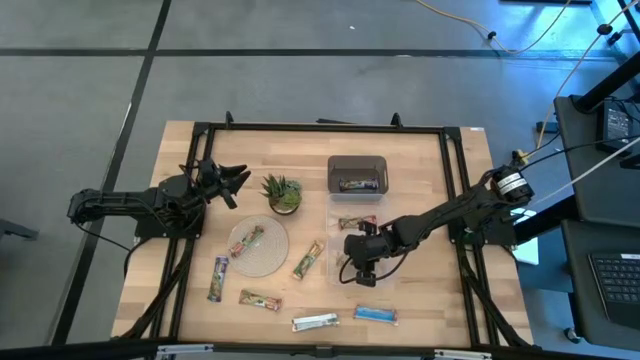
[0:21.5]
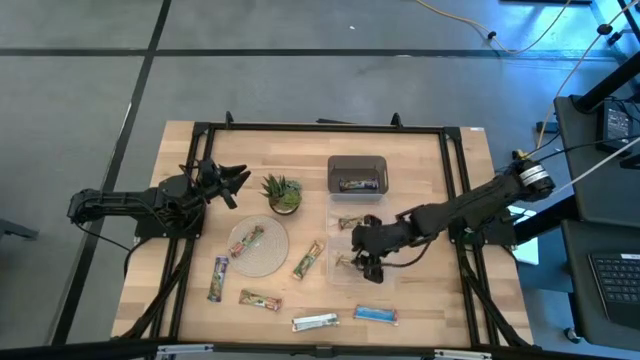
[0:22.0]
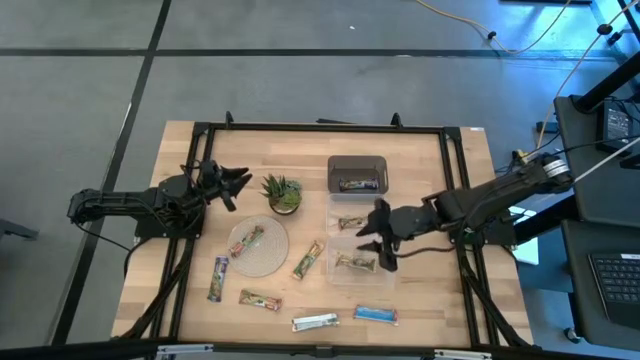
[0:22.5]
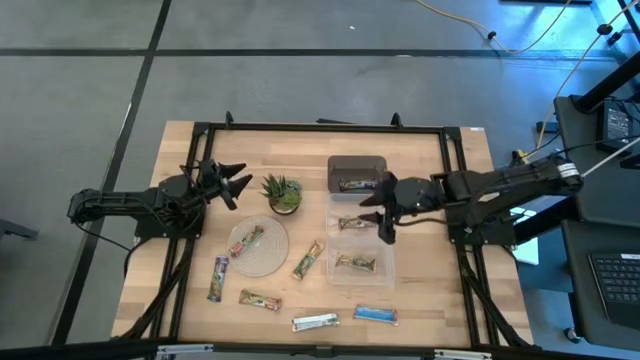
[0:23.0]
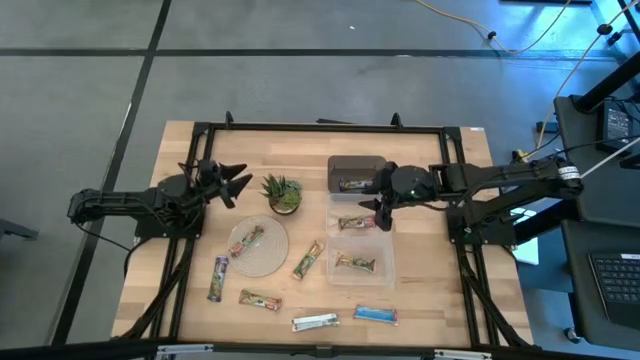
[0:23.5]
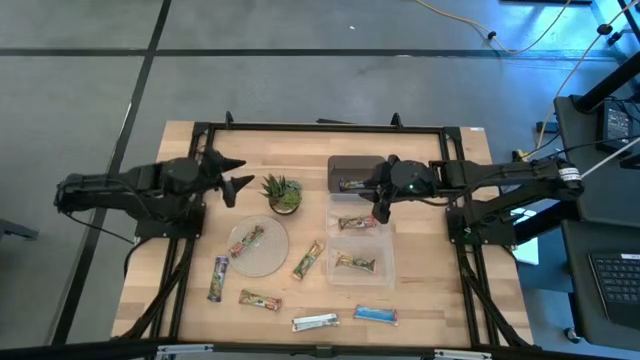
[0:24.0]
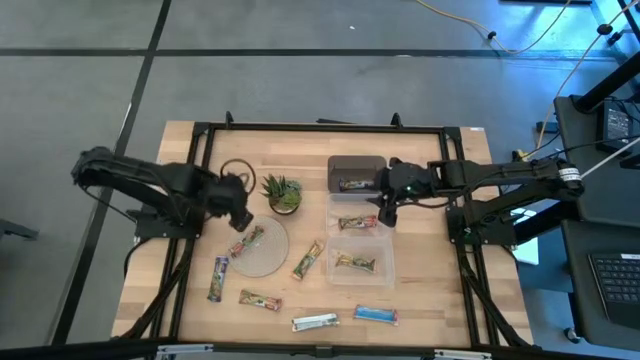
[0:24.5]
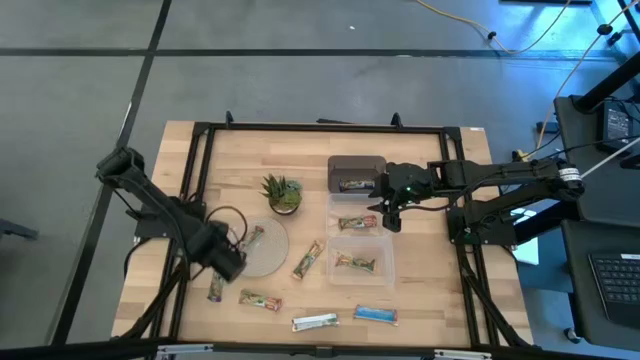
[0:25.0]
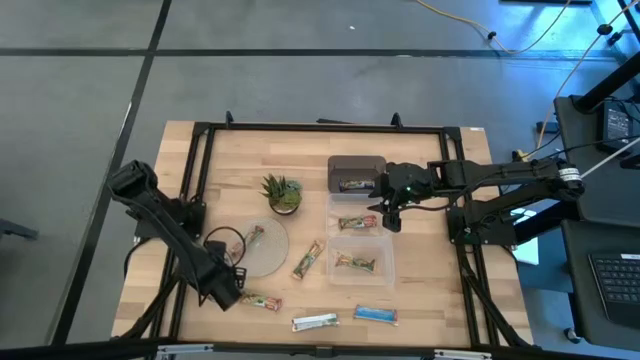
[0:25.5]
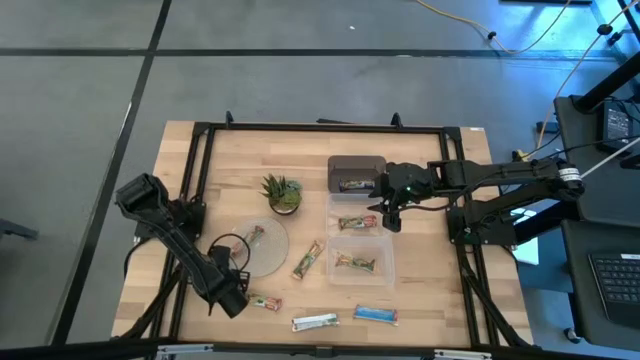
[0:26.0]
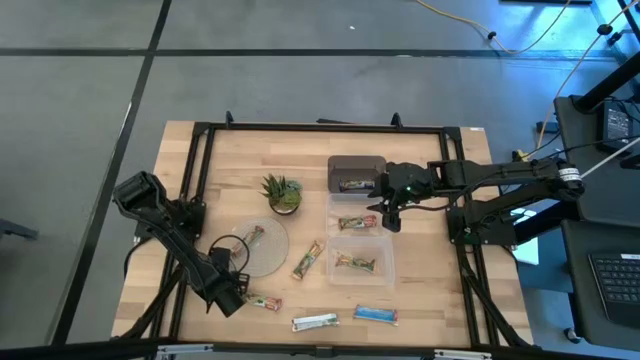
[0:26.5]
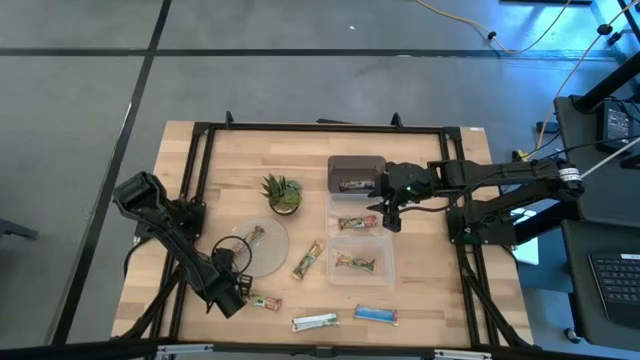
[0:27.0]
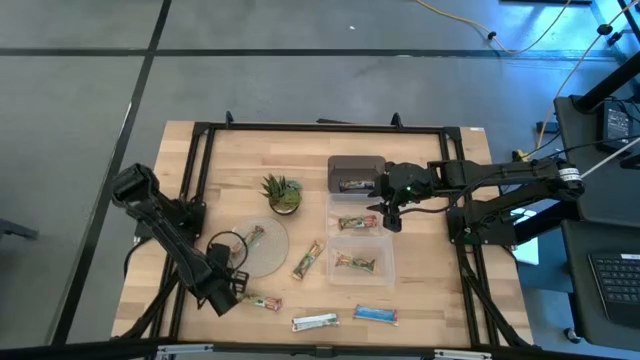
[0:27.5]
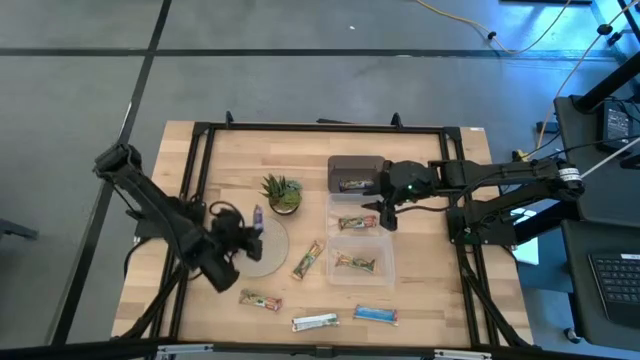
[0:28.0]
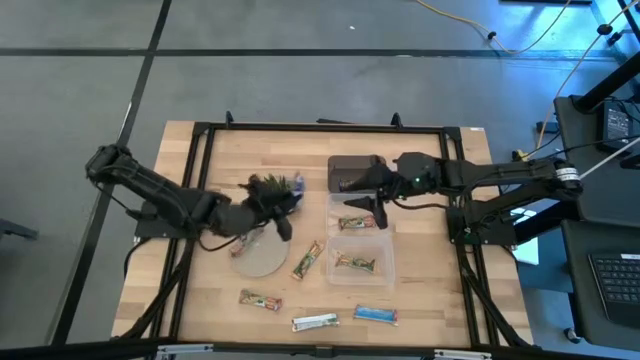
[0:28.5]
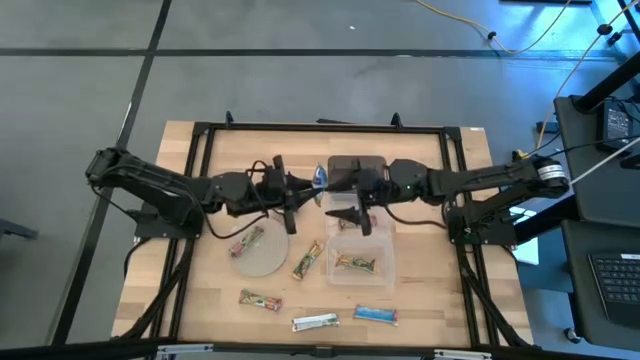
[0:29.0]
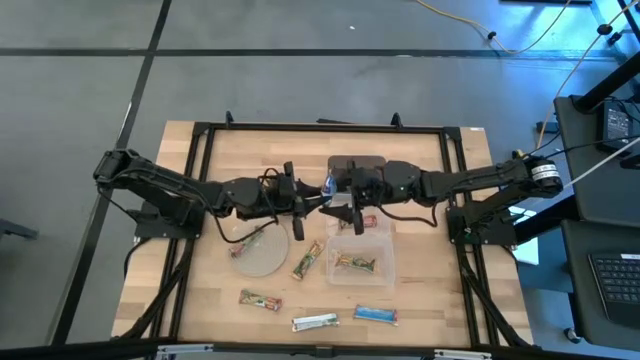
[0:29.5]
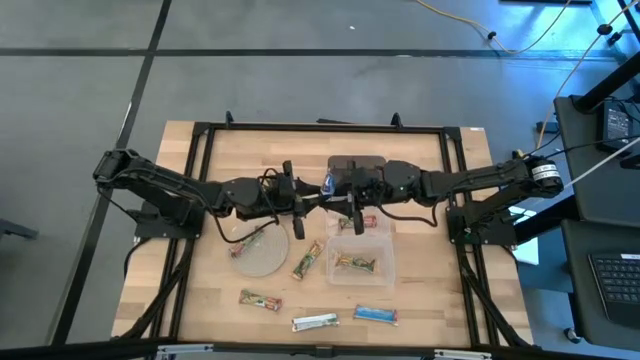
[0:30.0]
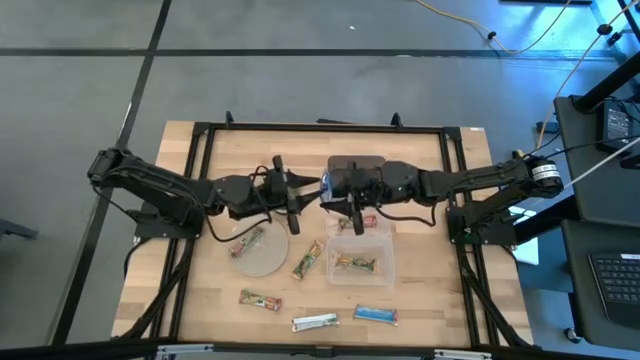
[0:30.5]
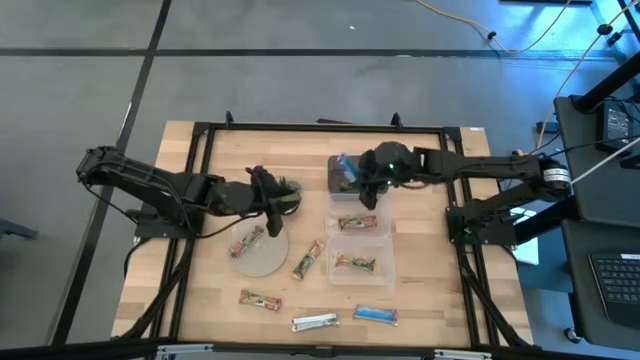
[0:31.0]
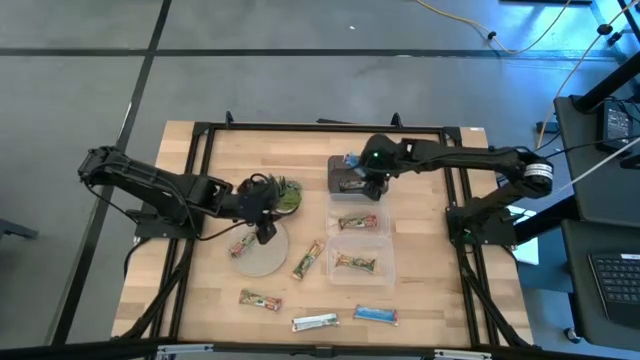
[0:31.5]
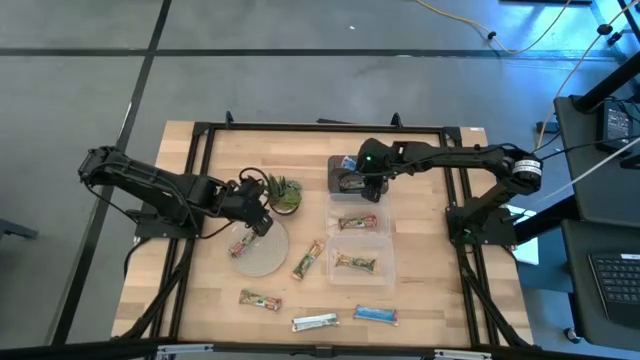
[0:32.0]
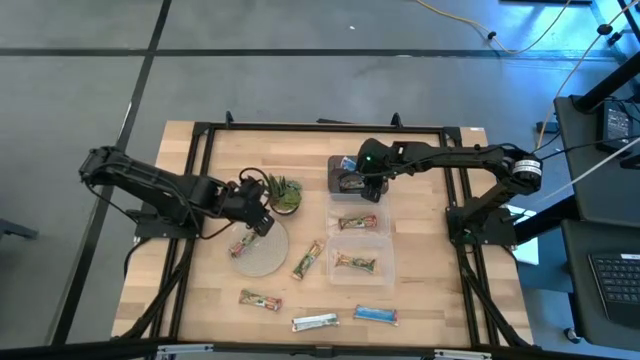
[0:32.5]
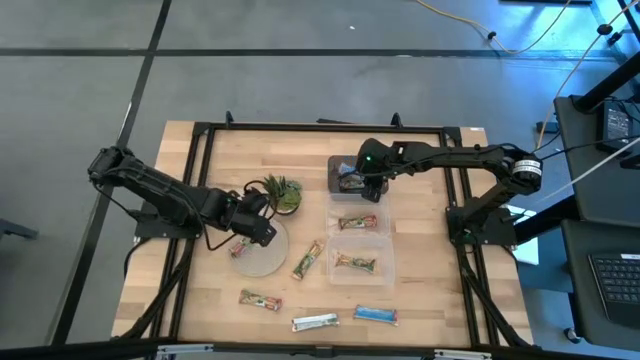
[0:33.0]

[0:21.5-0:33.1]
Task: Pick and place Granola Bars by type
Put the blue granola bar into the black bin

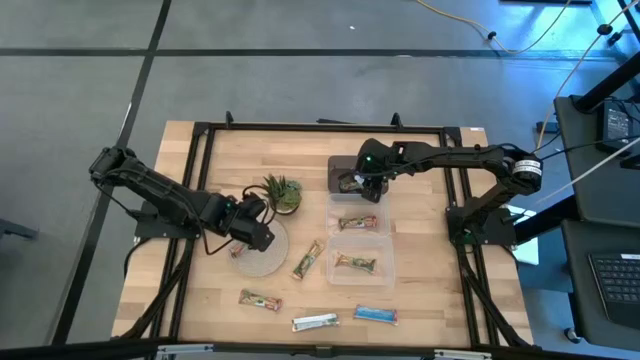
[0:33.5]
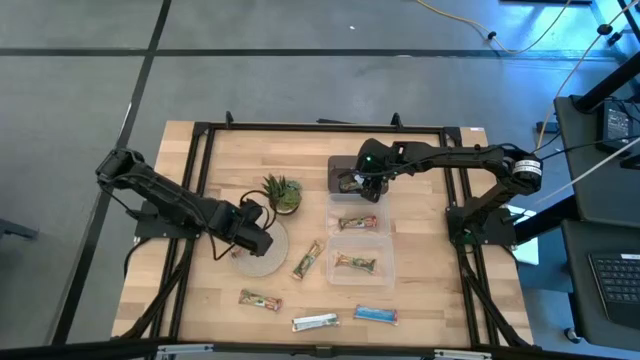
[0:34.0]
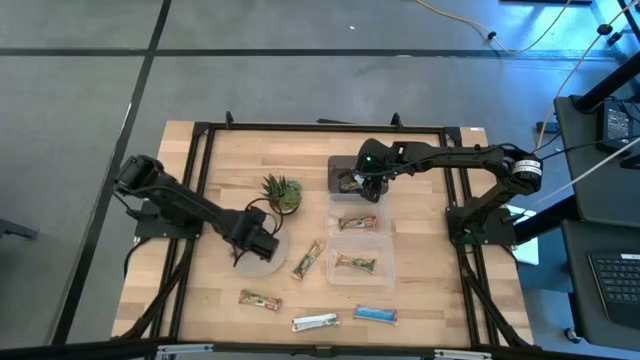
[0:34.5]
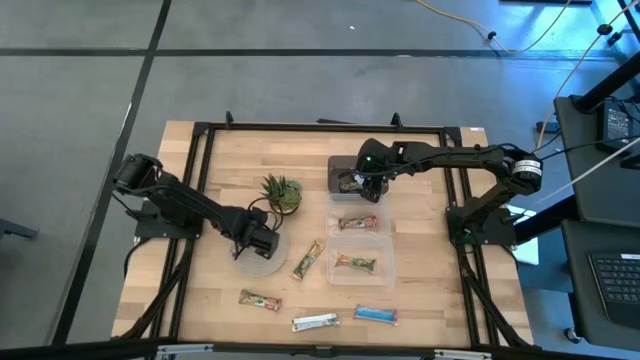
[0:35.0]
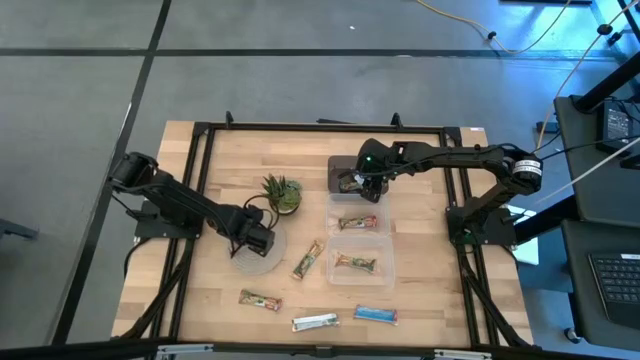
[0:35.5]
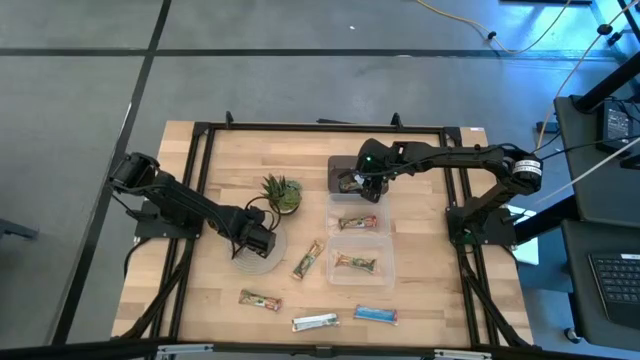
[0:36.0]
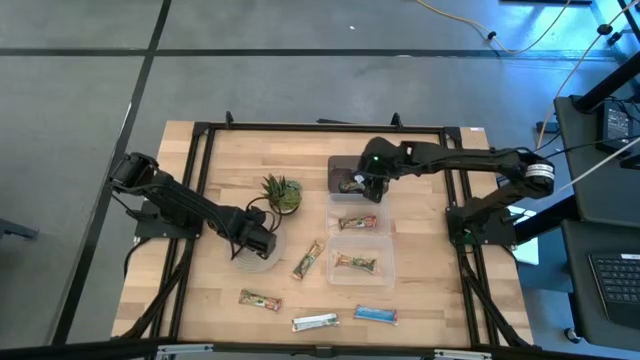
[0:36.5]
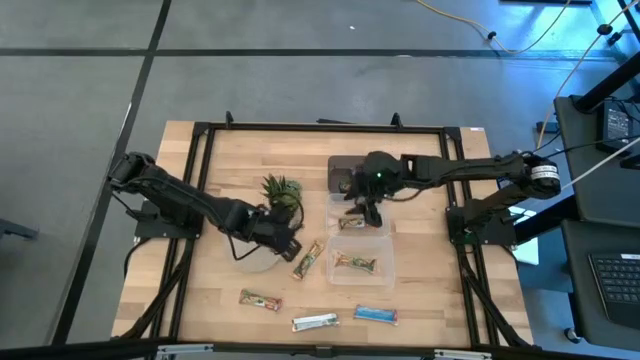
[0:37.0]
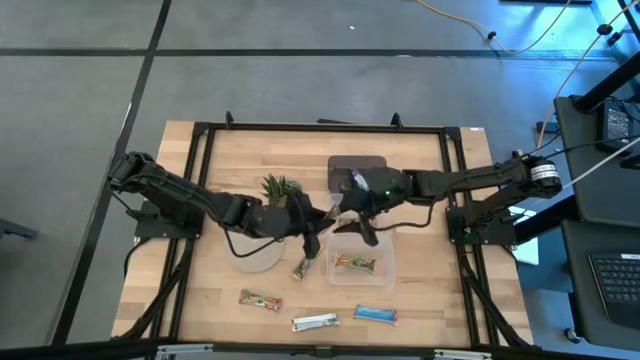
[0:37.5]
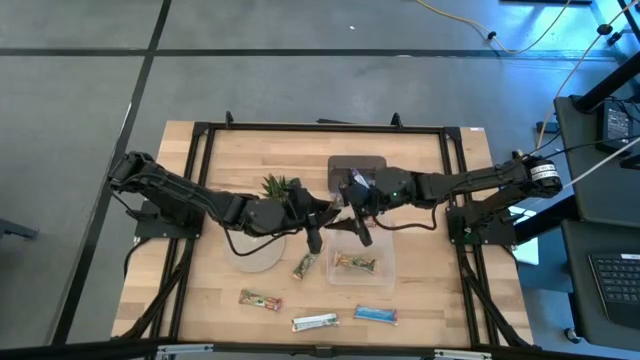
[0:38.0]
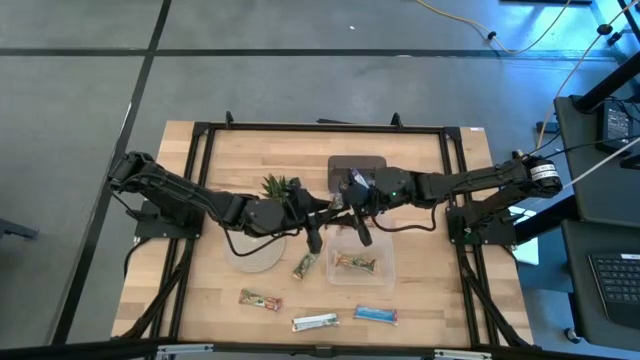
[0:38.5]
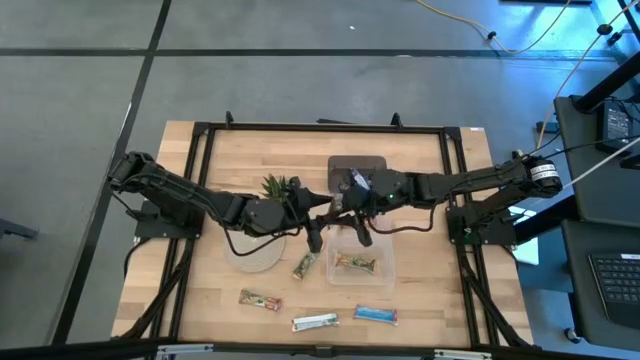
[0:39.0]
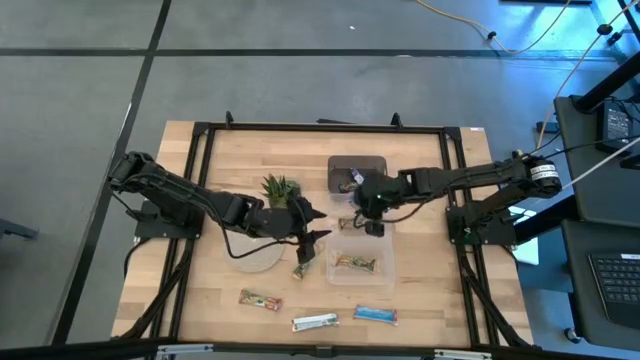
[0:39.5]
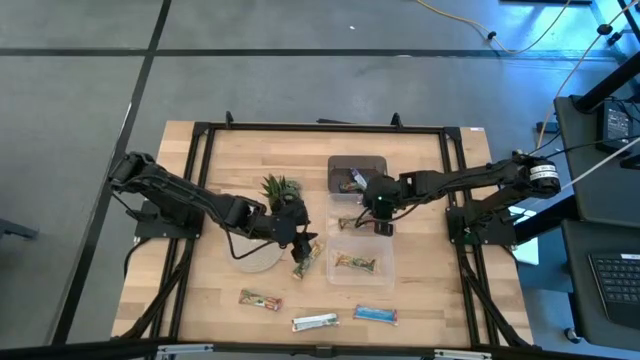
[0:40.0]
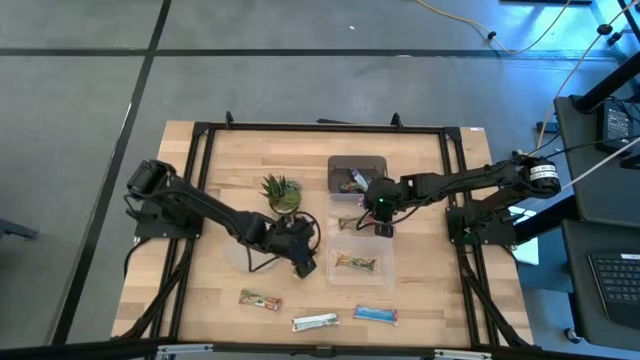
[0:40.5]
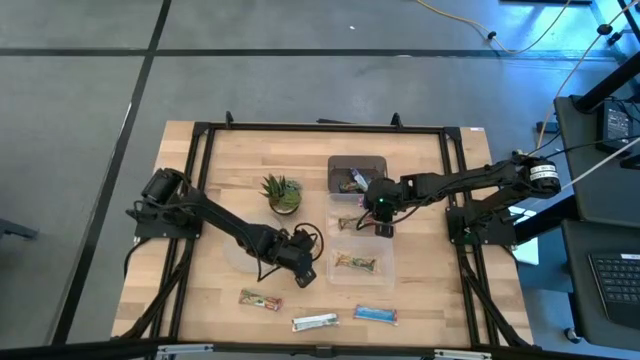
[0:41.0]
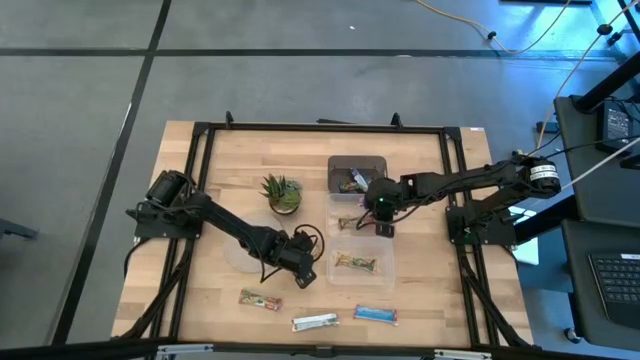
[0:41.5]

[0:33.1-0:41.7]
Put the red granola bar into the top transparent bin

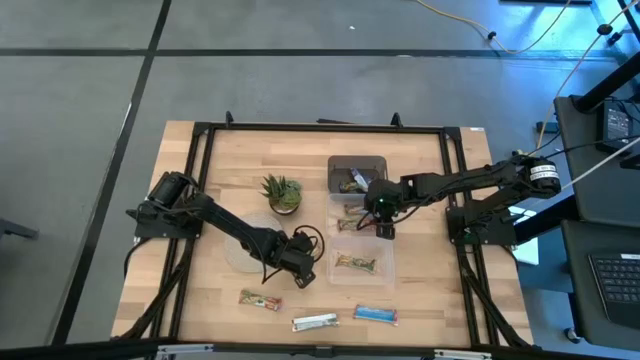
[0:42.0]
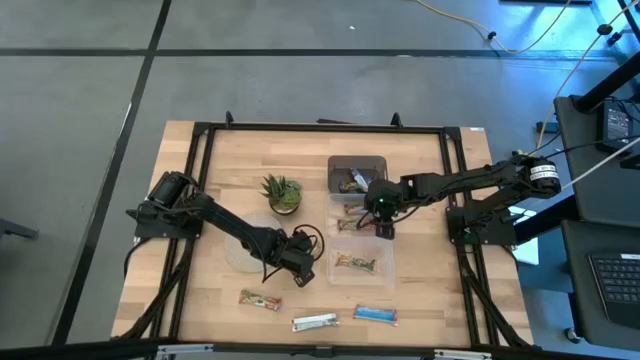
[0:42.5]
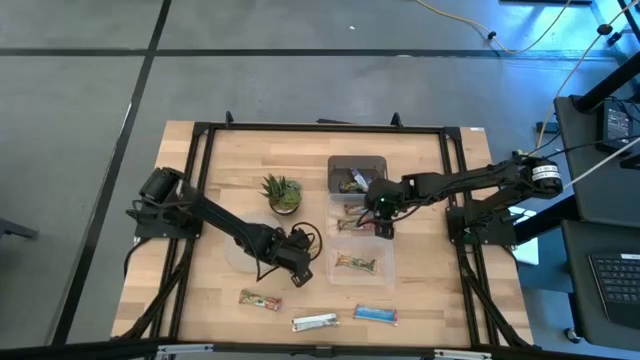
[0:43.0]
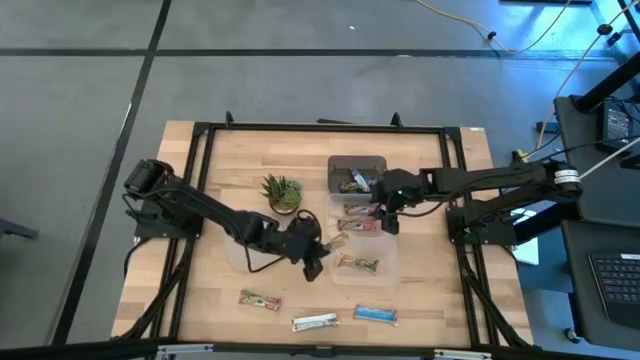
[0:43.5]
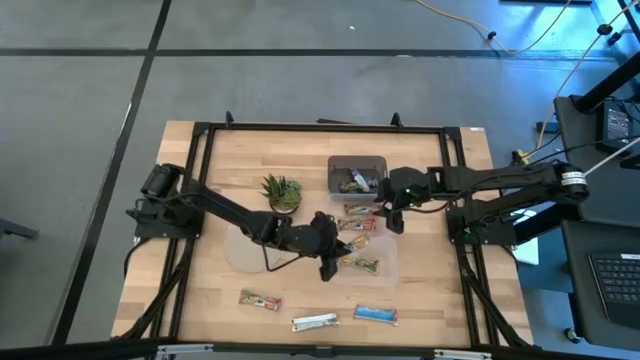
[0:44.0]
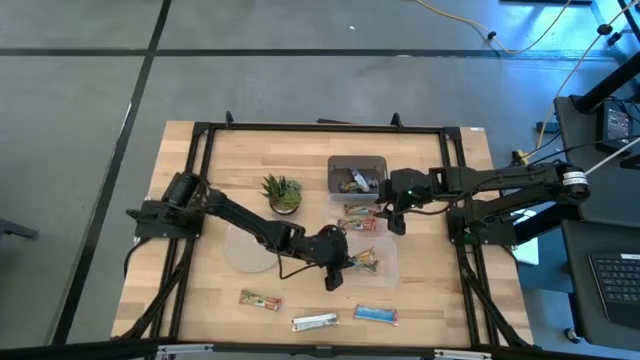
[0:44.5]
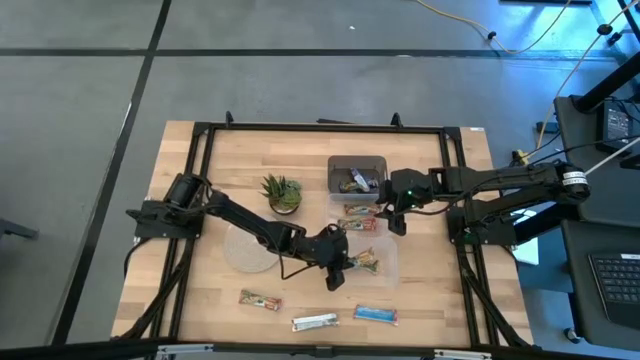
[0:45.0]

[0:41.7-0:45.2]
Put the yellow granola bar into the bottom transparent bin
